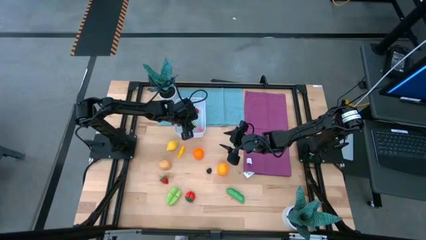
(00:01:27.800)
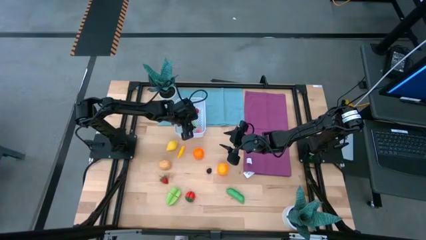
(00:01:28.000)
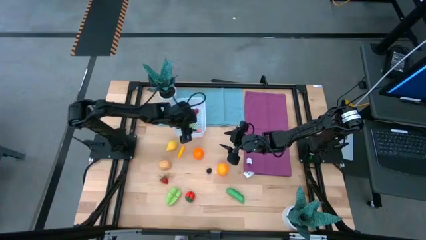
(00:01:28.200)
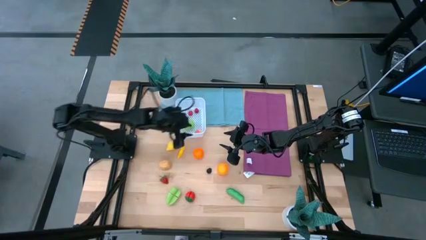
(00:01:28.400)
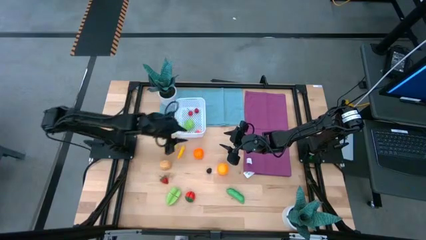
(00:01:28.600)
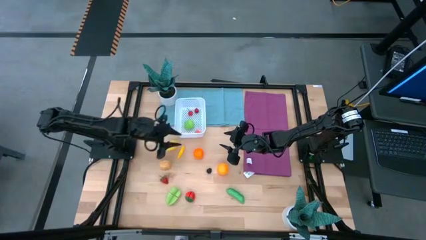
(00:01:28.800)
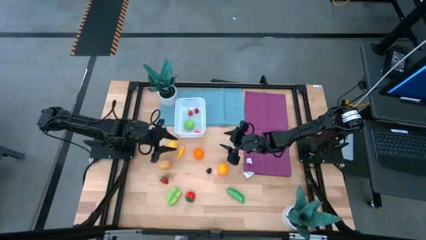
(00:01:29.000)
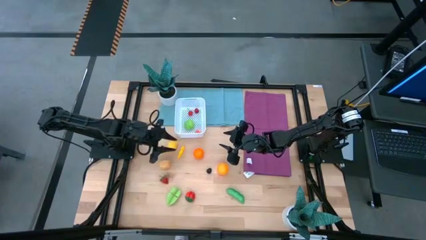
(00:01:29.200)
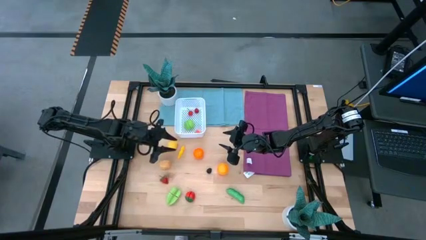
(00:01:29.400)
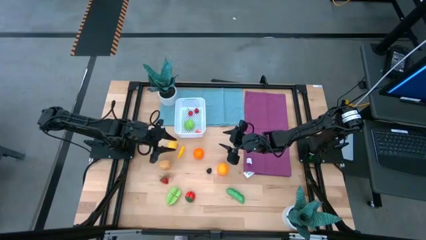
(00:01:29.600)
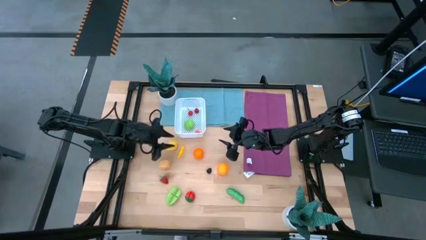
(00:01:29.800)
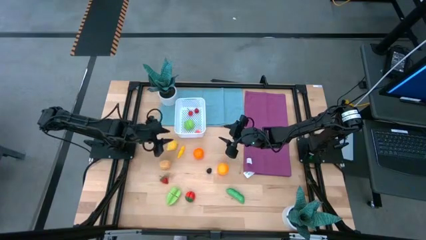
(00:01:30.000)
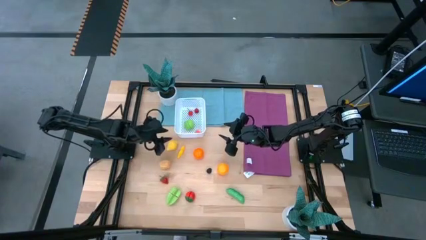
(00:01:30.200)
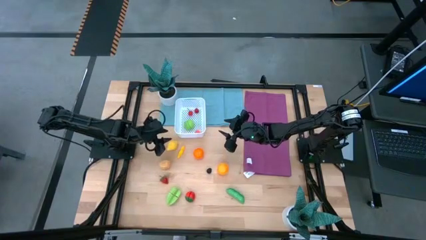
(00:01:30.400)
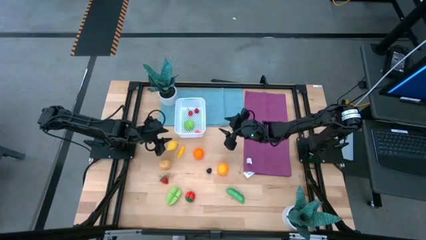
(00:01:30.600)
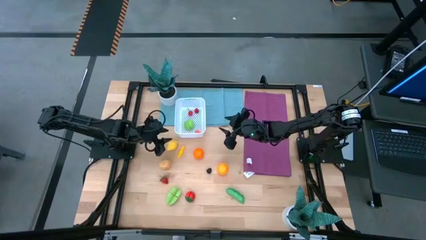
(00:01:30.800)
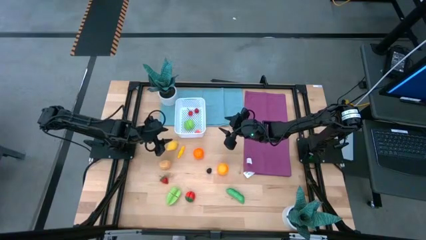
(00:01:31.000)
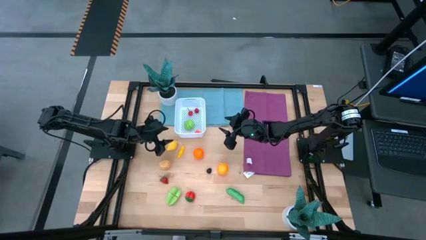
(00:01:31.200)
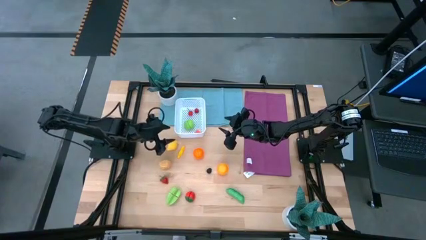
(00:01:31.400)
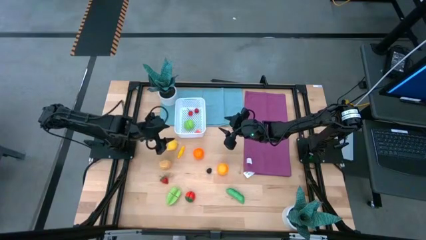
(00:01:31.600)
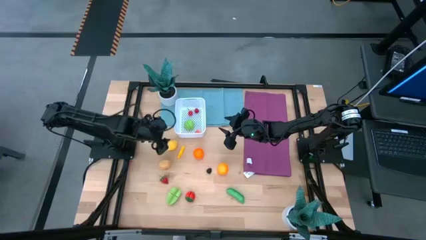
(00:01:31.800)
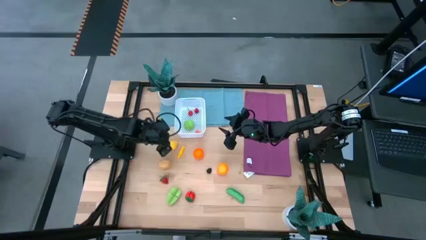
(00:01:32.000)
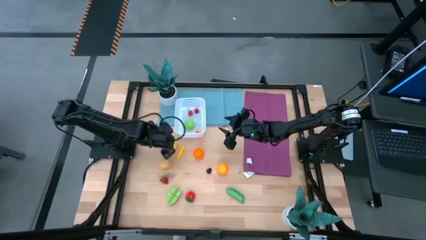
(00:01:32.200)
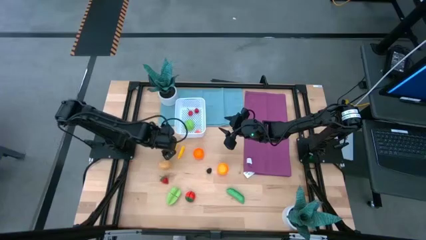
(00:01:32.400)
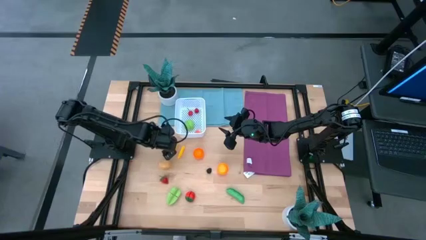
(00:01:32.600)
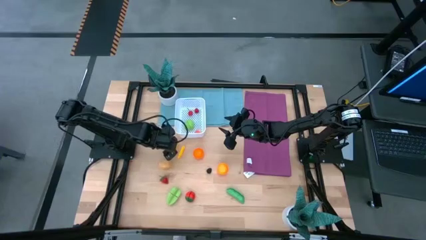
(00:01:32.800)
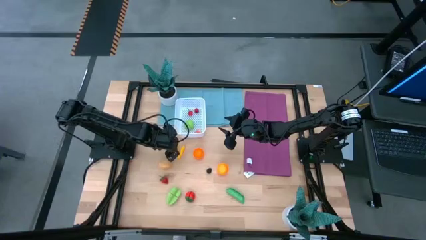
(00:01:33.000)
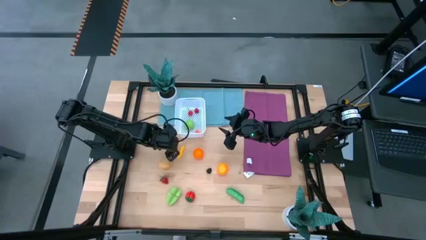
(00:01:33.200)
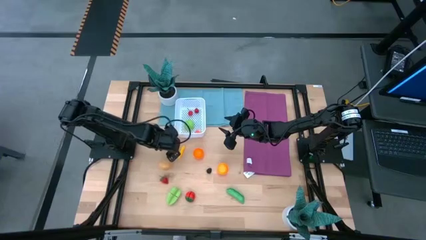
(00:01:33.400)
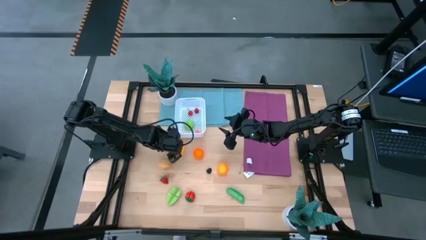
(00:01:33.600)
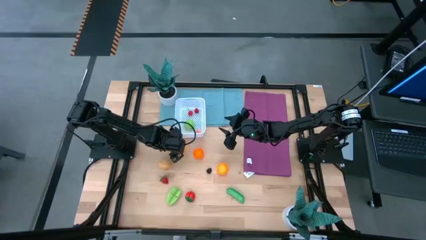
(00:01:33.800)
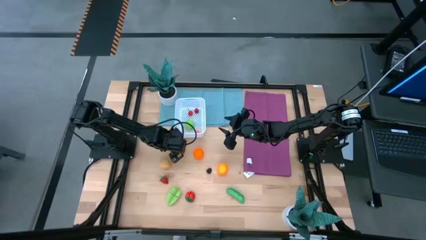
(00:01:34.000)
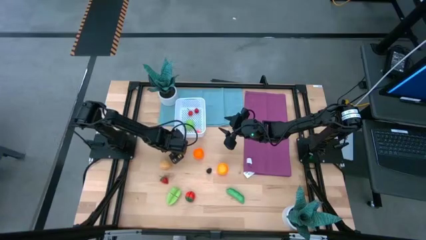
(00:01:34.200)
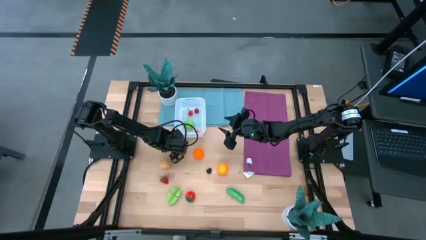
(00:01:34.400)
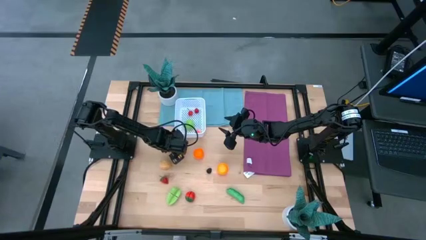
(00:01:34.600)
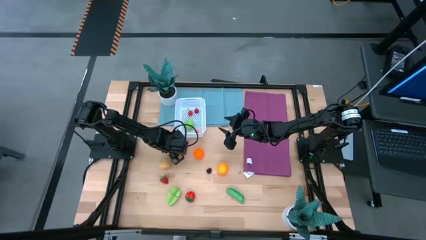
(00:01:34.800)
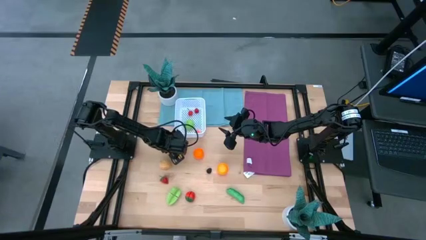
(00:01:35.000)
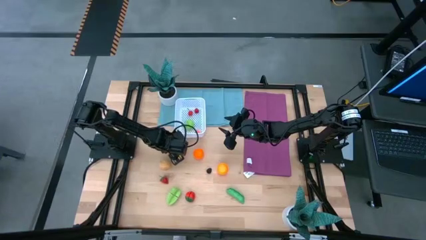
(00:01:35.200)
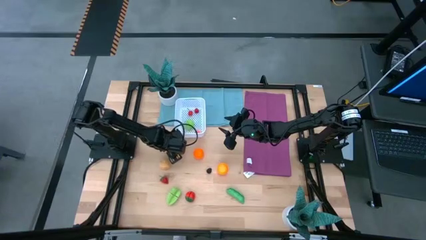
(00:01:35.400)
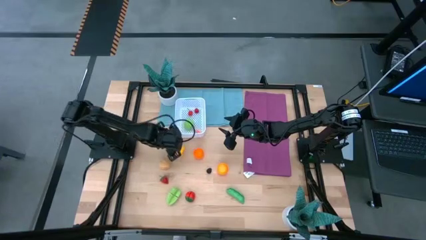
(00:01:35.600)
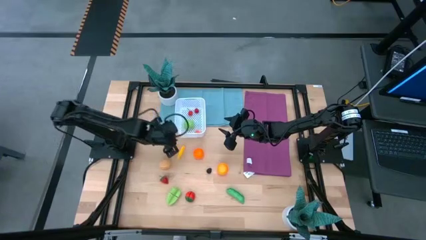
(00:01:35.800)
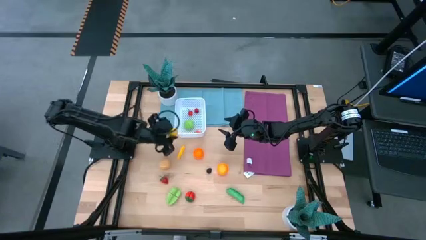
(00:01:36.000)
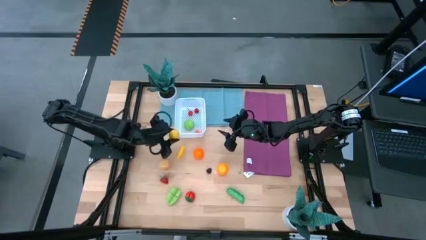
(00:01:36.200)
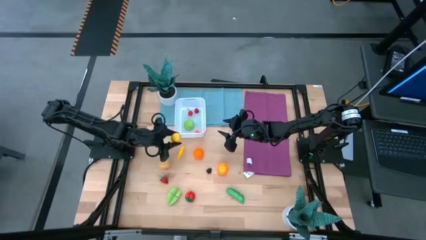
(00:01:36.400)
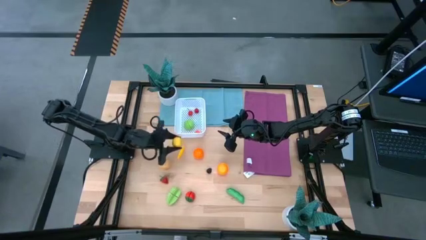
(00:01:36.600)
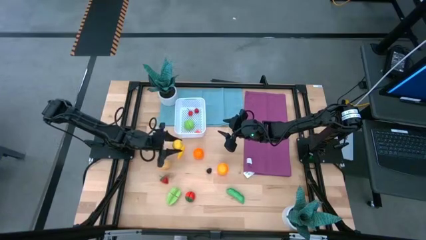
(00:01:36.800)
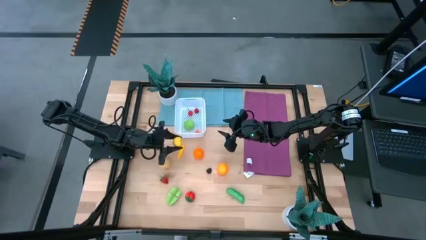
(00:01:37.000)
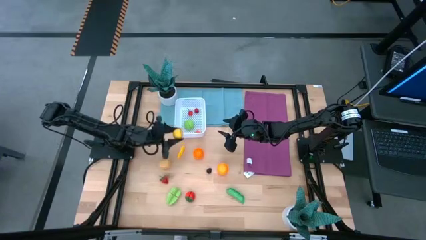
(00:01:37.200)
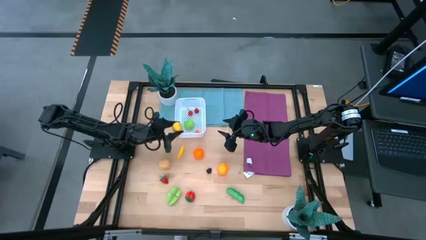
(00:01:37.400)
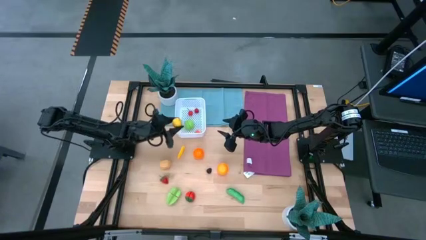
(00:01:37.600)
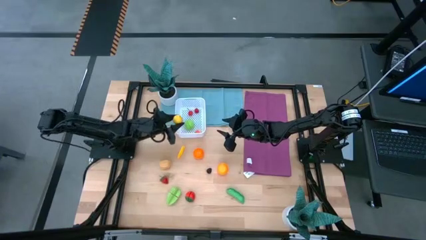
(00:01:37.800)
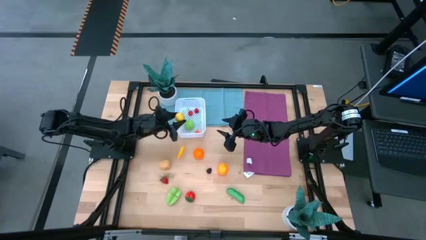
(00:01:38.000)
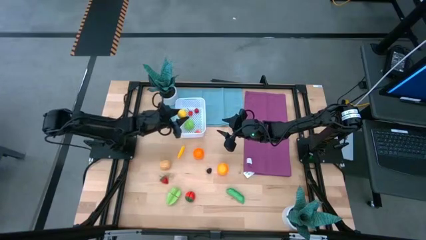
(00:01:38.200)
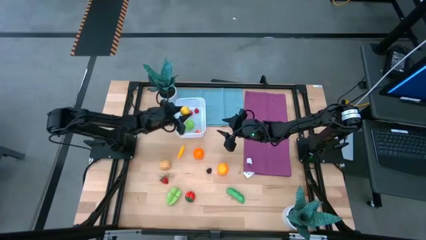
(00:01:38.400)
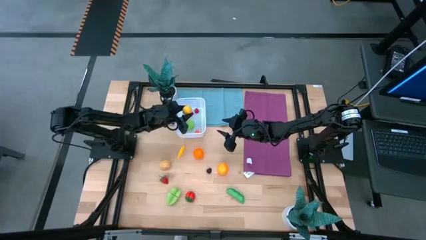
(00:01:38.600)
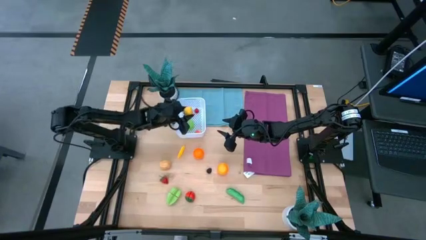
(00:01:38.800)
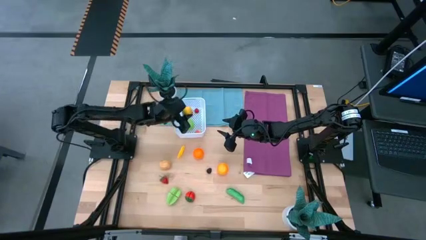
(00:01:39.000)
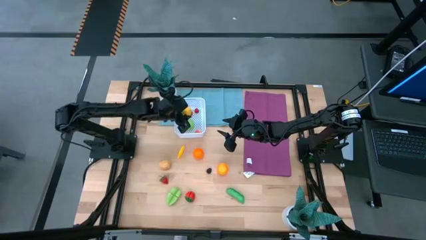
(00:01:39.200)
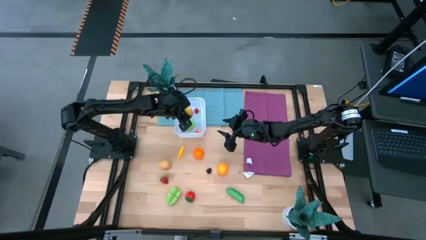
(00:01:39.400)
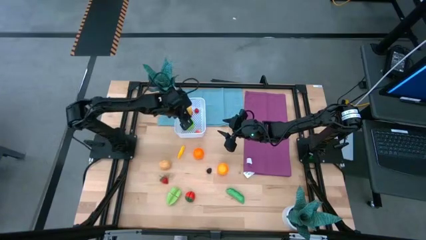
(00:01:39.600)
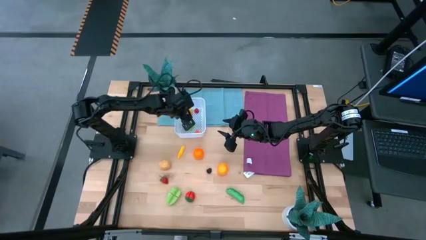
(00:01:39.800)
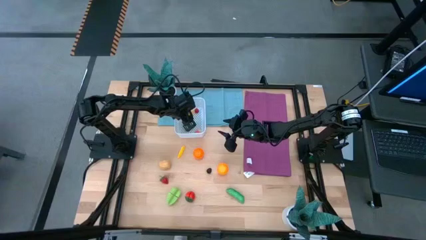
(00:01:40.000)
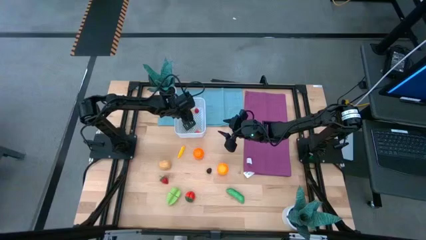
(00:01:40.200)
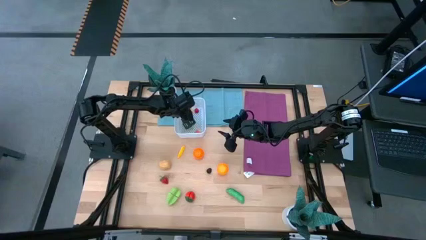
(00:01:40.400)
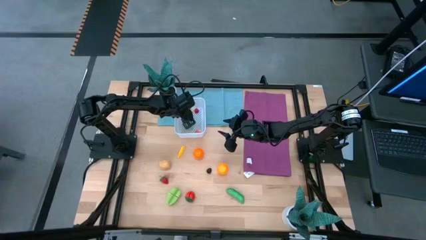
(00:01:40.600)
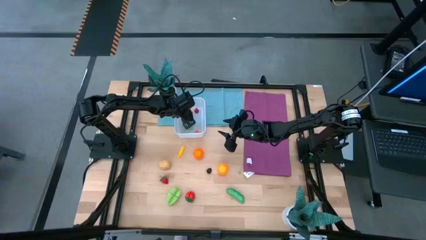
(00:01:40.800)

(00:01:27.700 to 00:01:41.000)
Task: Pick and placing Produce into tupperware
Put the yellow lemon into the white basket

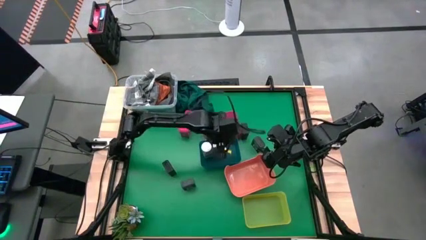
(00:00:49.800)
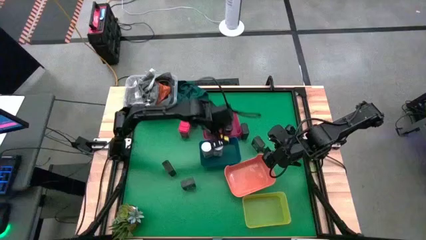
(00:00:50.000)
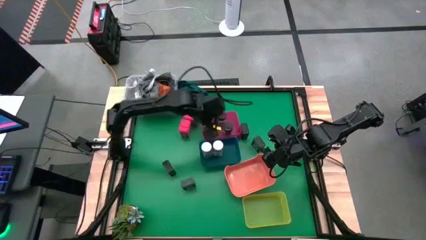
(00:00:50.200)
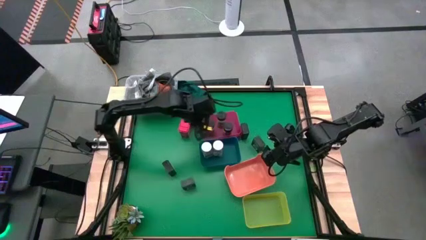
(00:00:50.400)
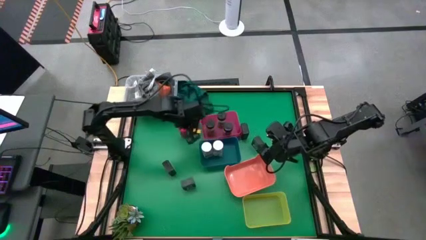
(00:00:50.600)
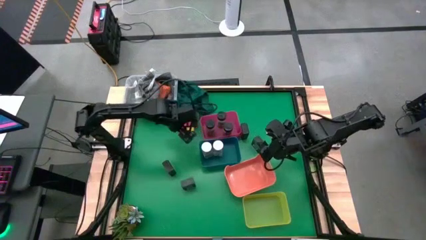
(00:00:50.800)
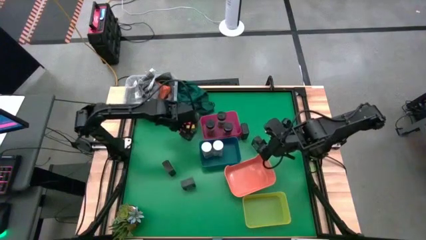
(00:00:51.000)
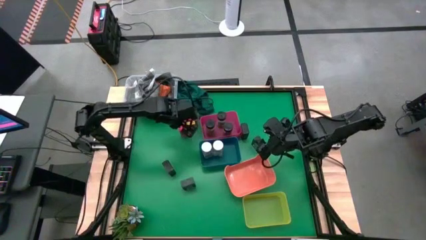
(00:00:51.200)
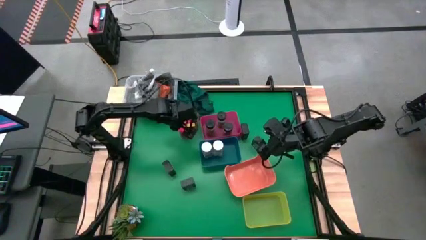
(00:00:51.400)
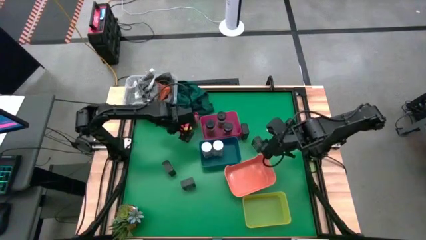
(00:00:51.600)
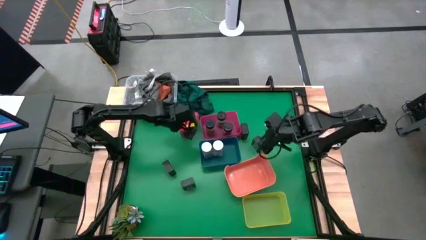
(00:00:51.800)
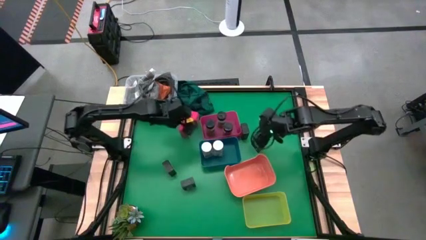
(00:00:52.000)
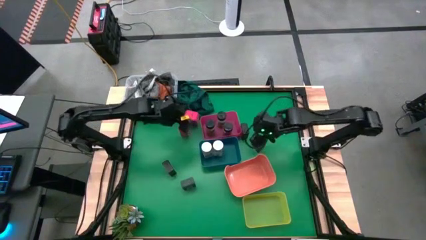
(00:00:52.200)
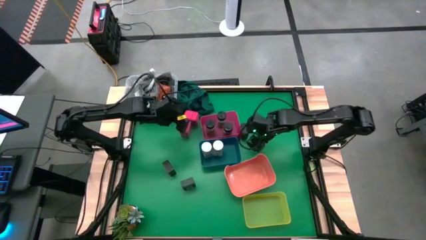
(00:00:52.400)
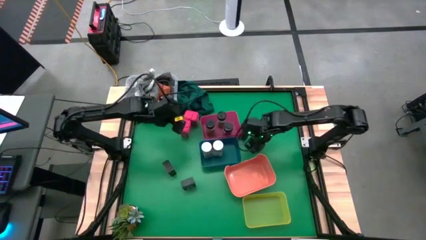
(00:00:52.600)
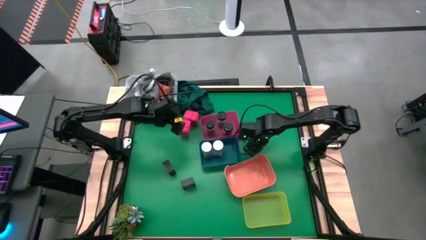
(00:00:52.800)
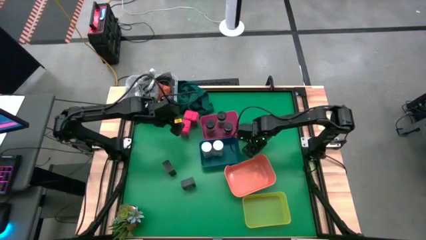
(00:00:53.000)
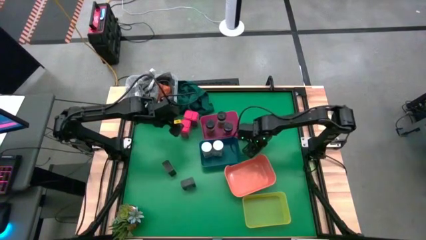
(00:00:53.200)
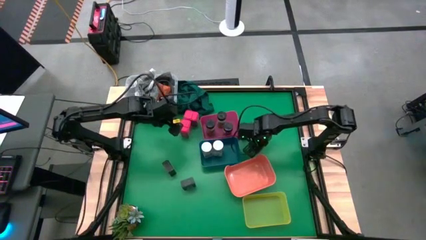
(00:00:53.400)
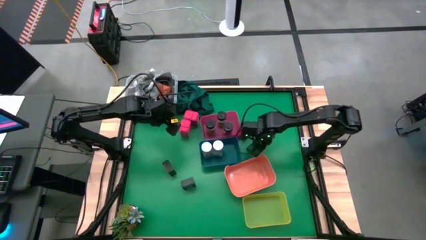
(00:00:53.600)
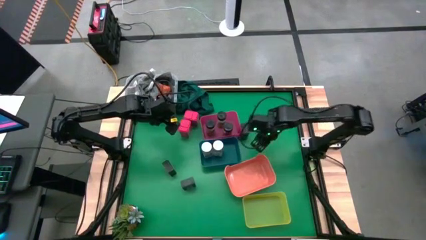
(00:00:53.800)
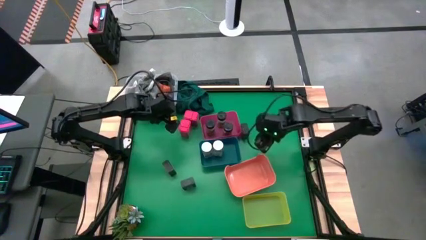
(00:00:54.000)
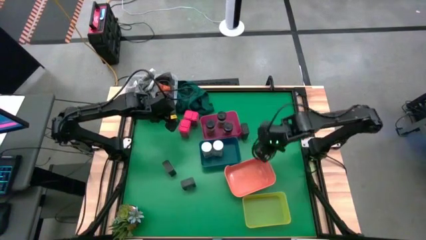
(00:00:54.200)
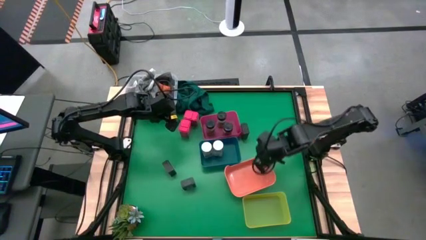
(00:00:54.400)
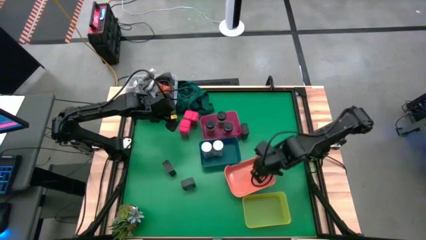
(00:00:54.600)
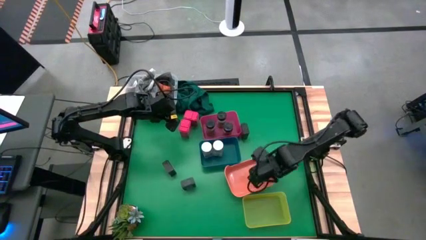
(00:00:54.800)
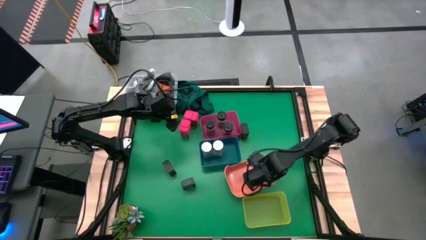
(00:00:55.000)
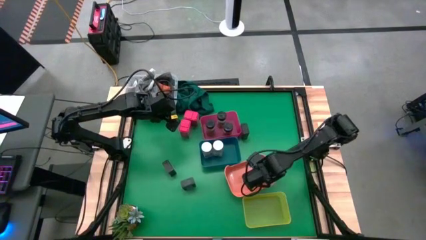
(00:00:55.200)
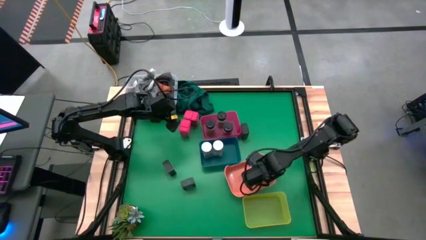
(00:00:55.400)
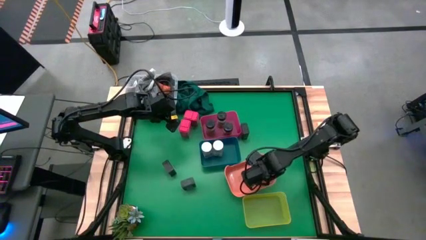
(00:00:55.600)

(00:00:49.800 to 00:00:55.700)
Task: Sort spices by type
Put the middle right black seasoning can into the orange bin
